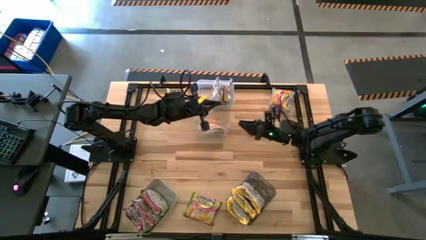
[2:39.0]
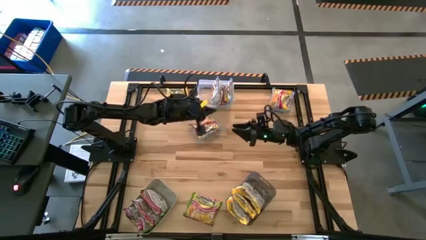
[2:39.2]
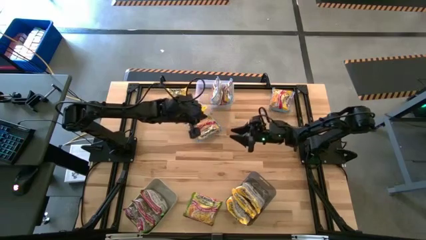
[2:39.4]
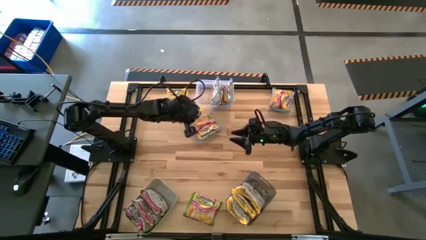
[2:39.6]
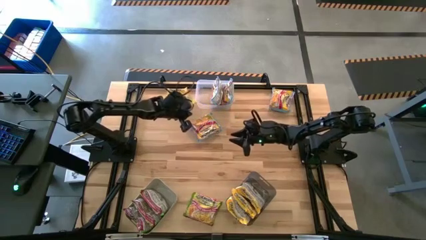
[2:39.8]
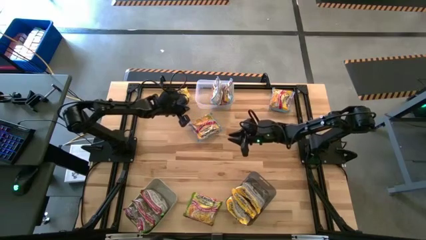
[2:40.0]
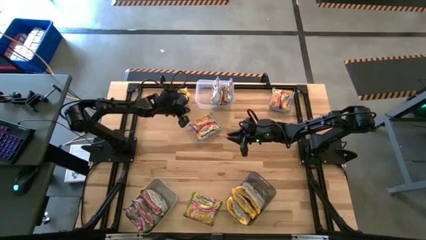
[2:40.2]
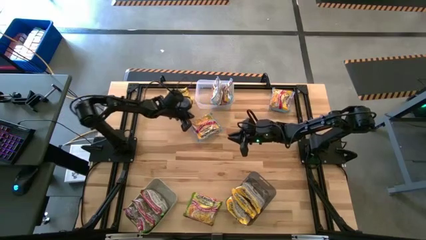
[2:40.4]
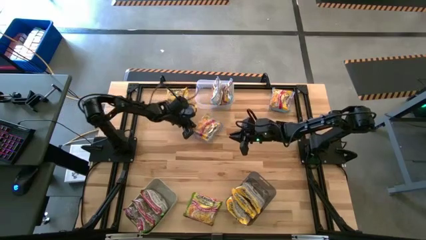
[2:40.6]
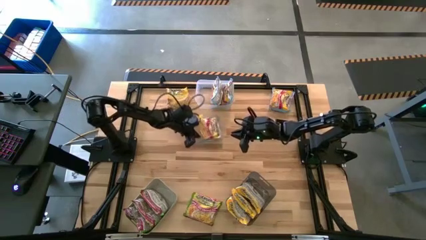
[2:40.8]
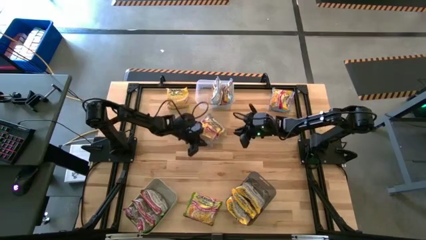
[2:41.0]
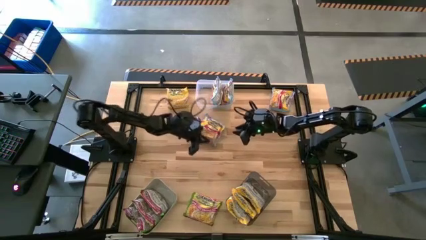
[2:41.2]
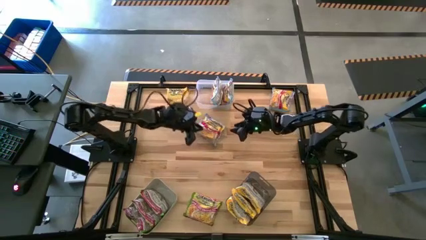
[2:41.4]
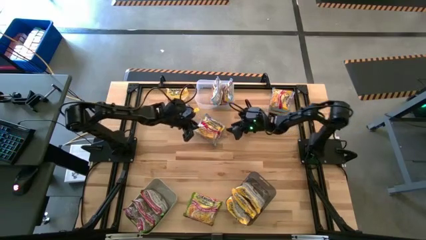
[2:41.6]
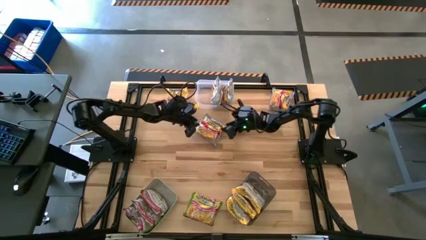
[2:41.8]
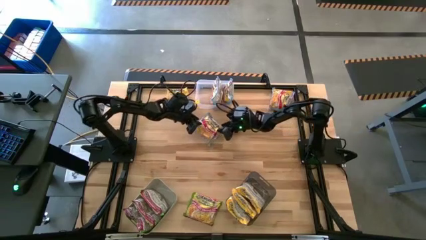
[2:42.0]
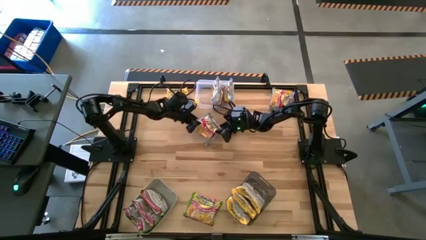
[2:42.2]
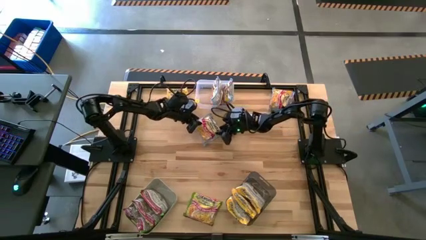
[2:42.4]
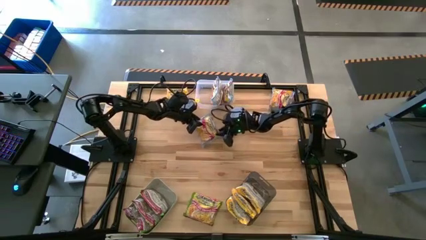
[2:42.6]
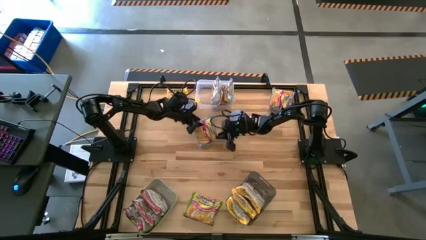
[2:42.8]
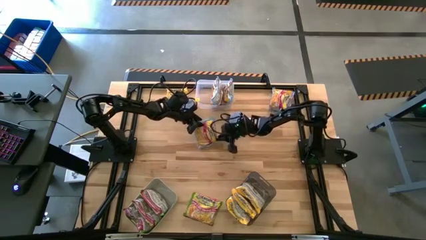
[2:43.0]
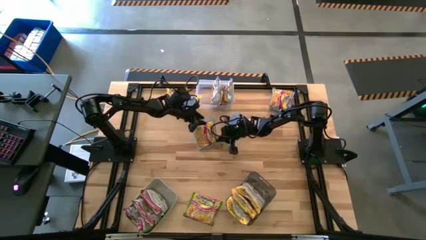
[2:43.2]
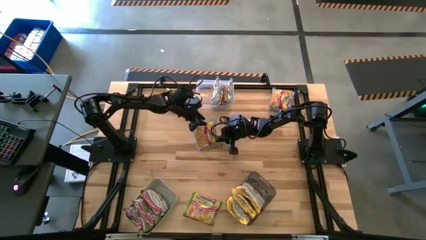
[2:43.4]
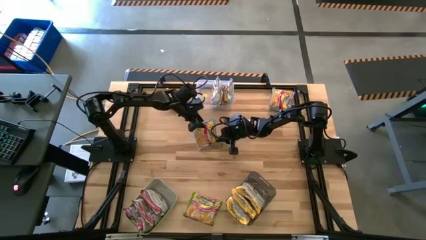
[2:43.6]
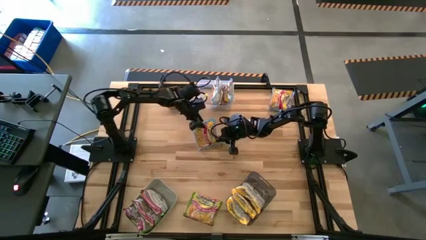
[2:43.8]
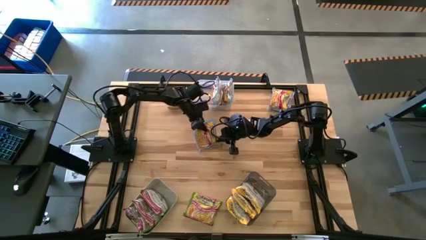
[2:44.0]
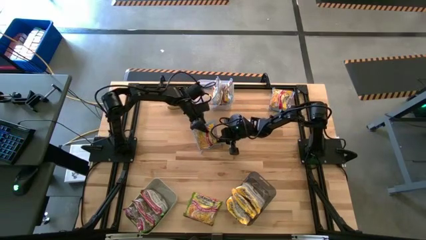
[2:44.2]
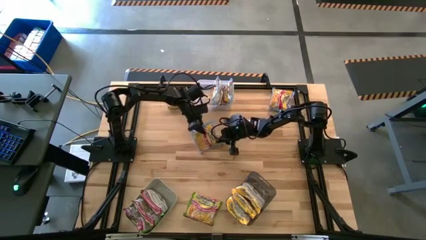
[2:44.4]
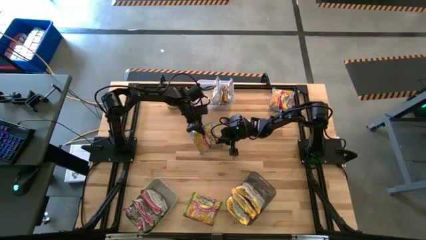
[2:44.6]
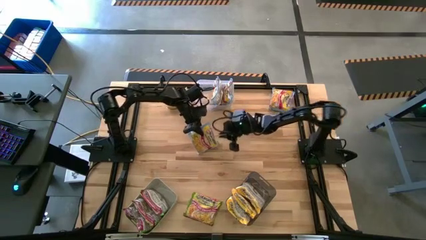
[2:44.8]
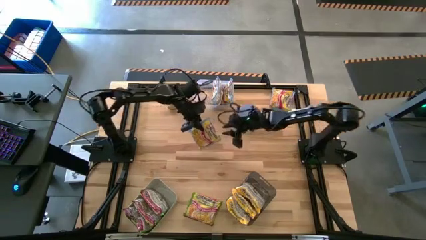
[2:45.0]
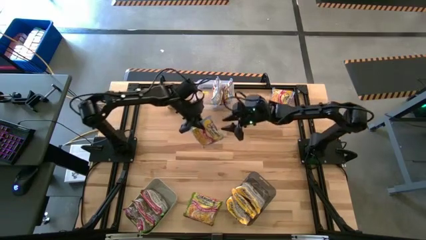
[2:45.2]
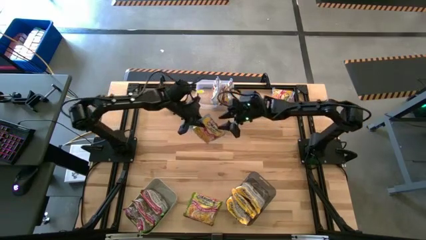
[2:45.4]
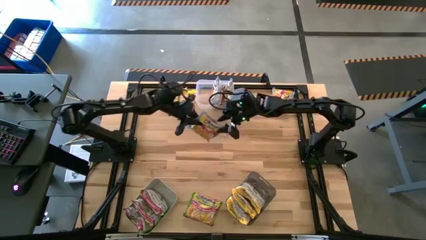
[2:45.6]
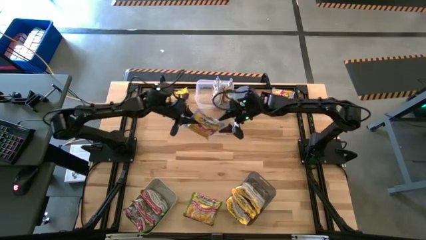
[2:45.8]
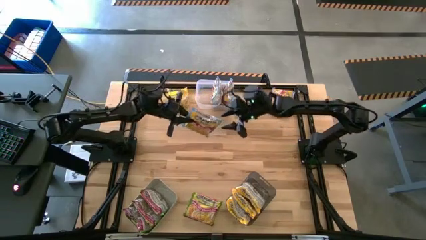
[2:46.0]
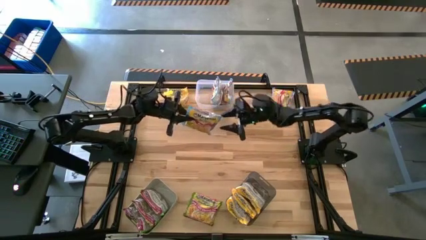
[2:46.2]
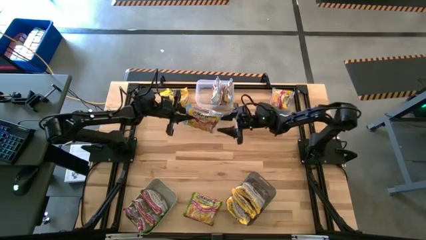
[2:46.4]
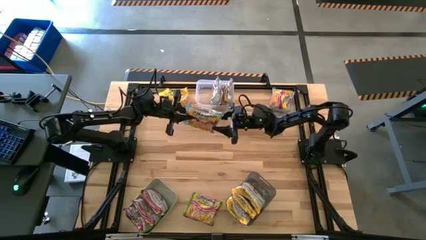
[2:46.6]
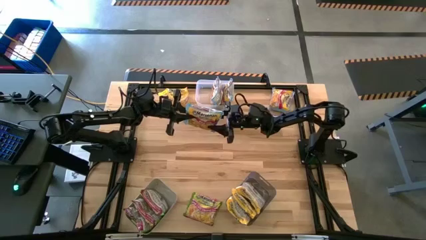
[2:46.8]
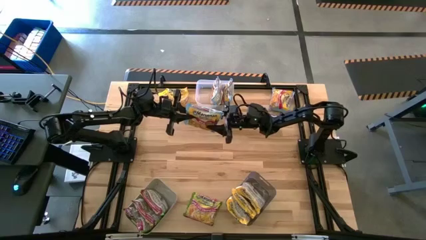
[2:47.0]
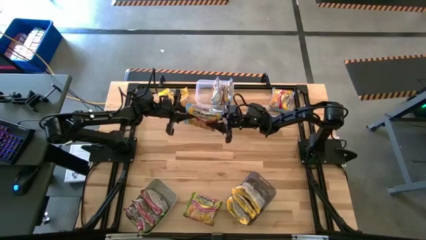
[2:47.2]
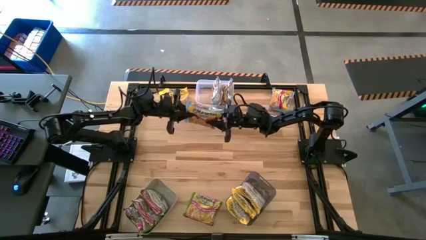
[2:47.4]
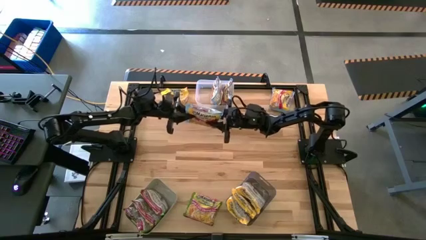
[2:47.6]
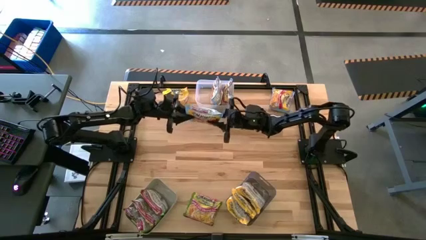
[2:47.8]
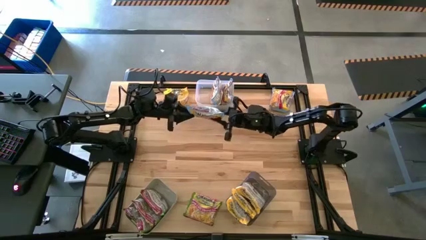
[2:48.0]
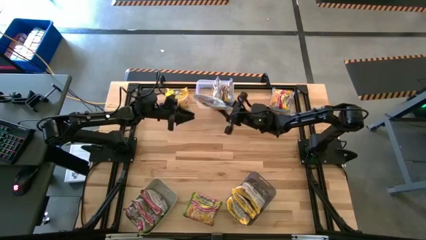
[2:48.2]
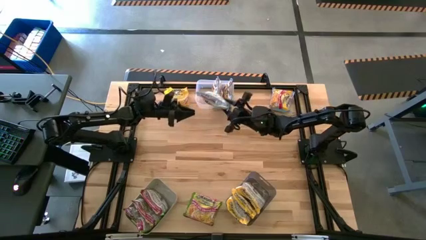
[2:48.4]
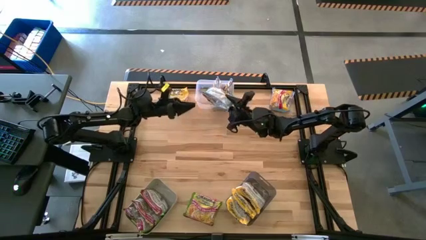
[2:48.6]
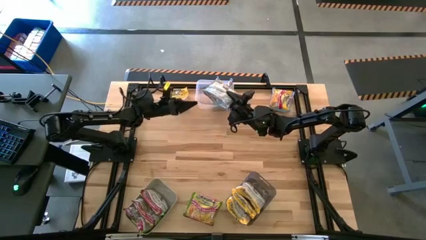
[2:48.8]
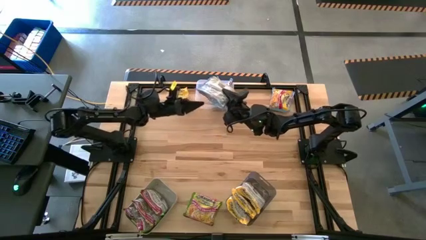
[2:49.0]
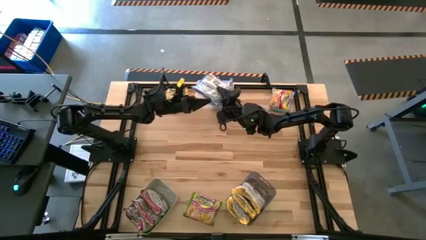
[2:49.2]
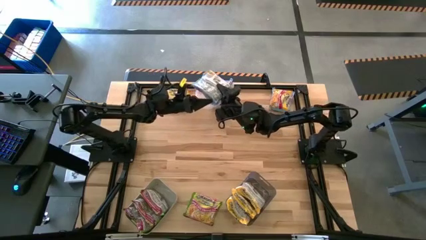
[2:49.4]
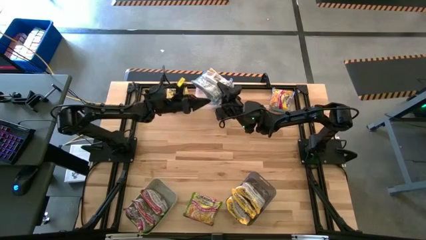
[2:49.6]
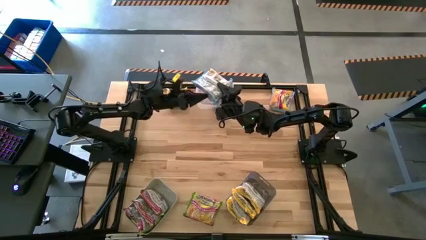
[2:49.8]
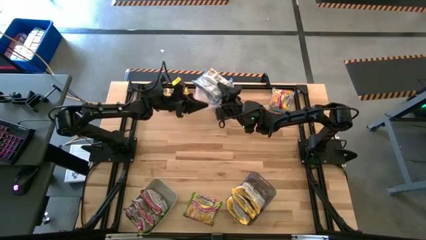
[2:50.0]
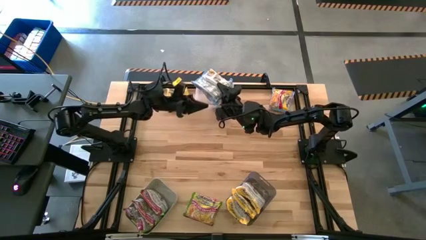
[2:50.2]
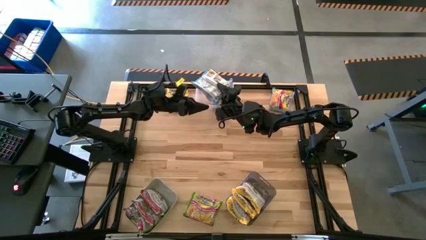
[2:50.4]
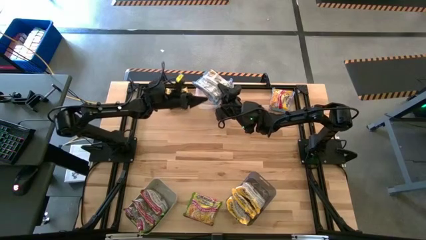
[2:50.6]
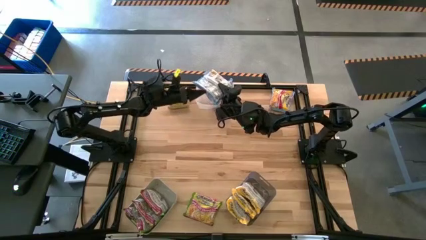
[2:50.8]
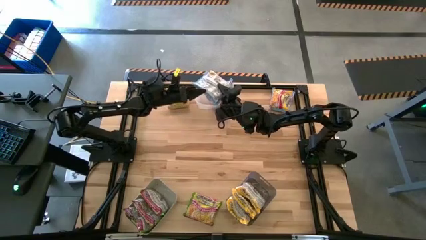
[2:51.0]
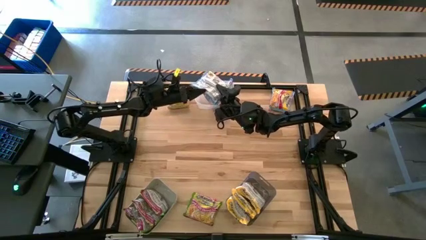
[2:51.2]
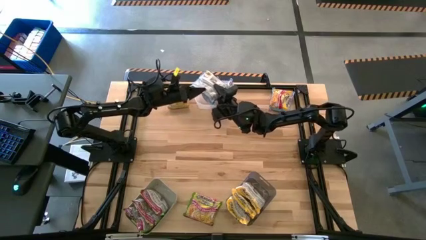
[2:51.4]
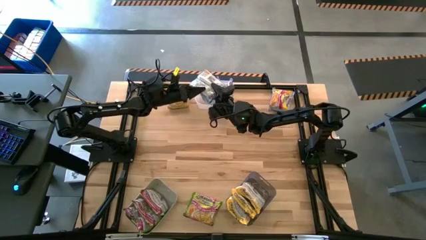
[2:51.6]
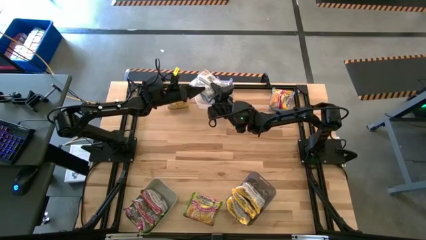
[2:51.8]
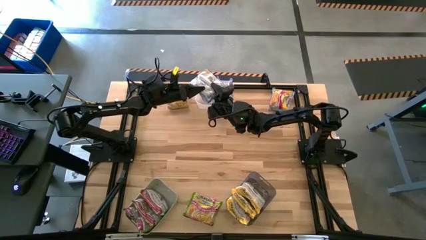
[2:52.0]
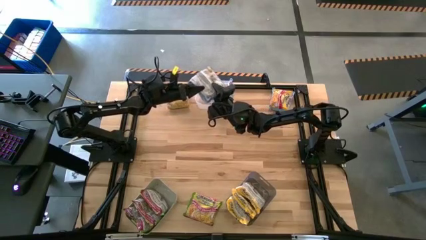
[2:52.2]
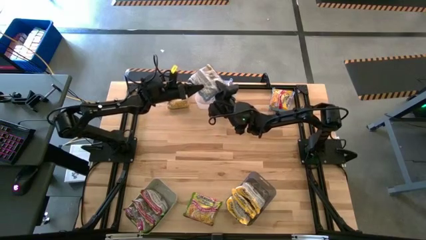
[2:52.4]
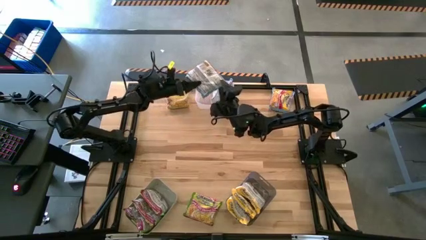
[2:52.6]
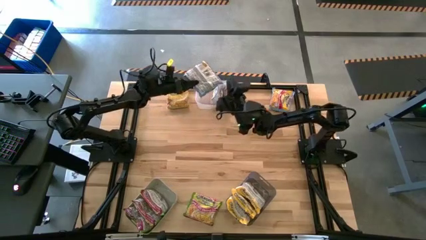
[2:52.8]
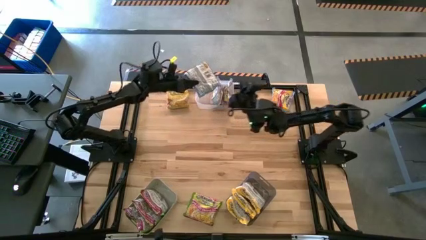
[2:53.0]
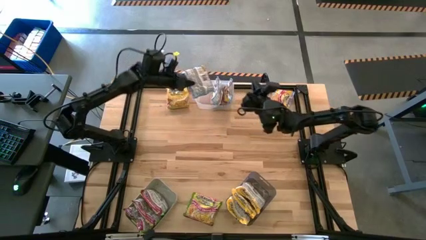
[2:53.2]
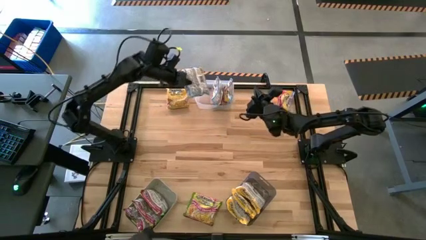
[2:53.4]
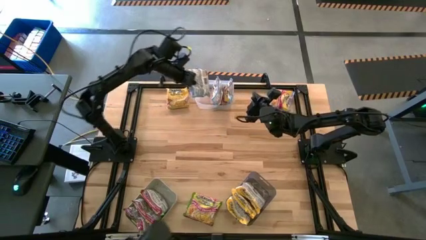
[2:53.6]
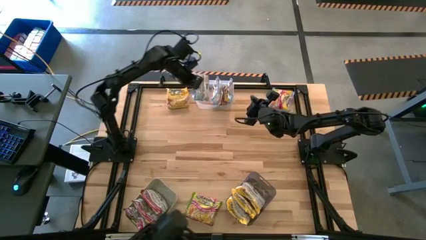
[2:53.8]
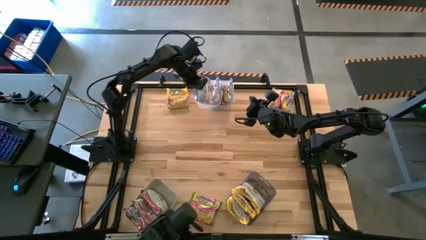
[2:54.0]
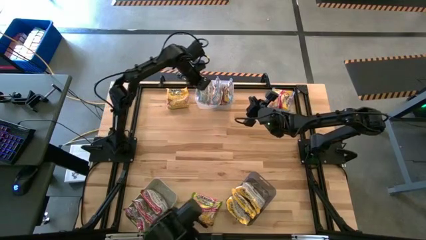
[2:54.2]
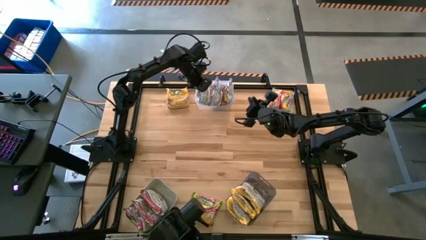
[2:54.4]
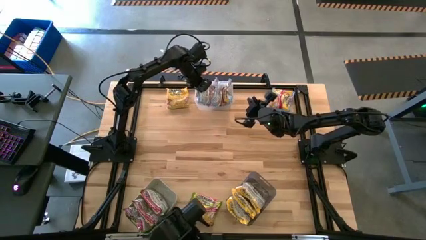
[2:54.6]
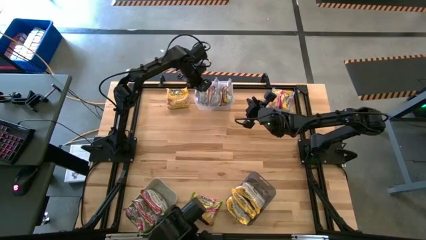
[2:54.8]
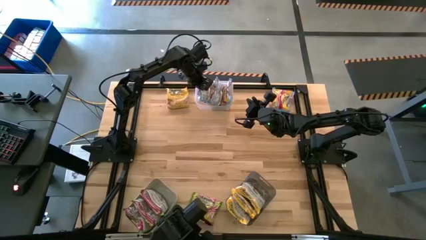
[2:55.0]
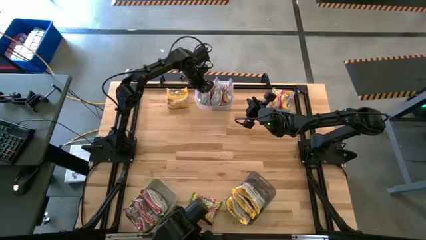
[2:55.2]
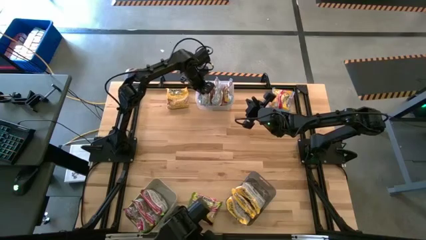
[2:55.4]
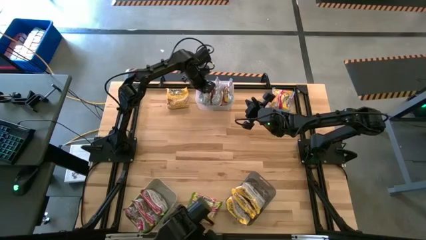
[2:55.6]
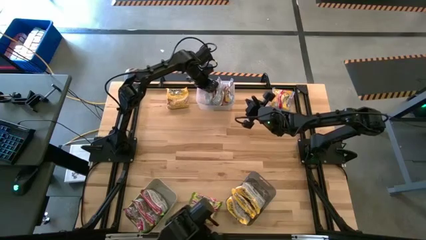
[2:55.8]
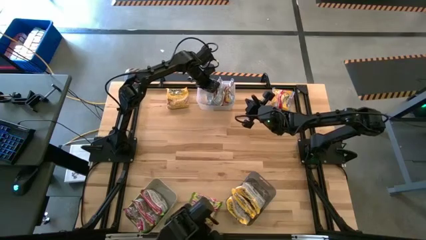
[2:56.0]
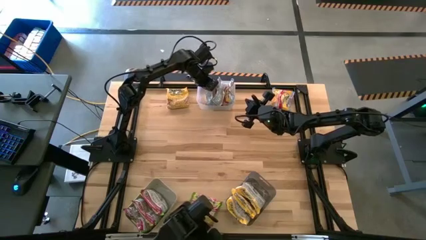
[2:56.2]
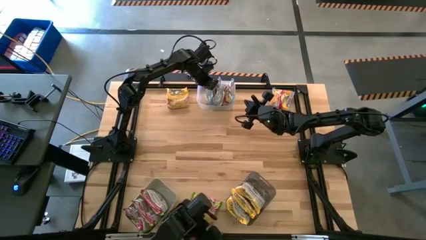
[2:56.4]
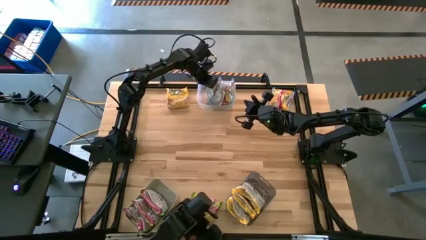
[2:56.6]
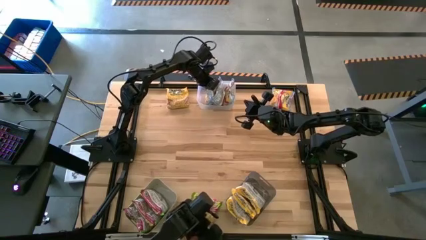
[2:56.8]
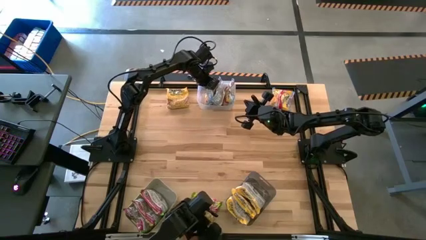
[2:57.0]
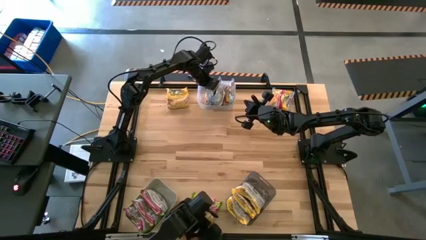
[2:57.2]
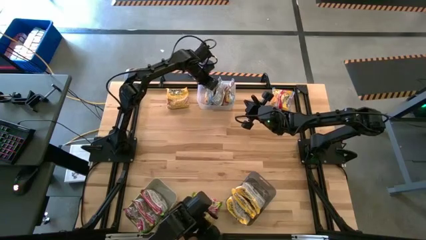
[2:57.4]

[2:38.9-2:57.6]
Task: Sort Maruchan noodles
Put the light blue noodle pack into the transparent bin
